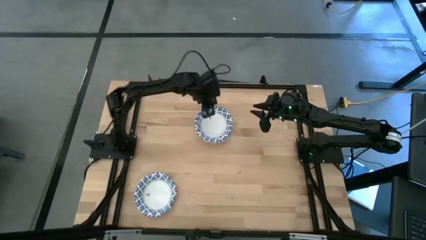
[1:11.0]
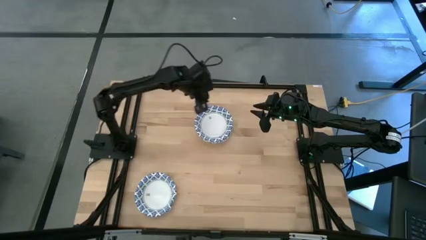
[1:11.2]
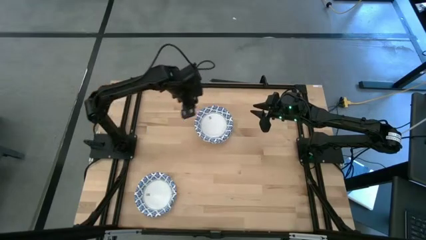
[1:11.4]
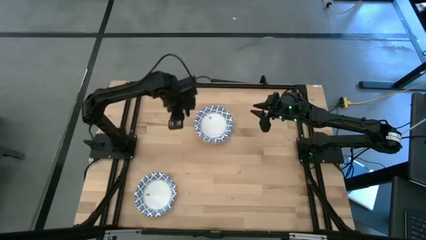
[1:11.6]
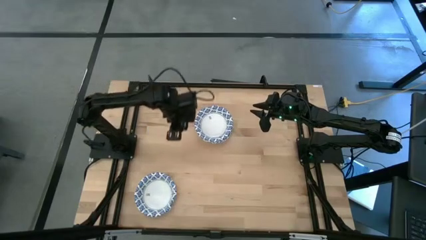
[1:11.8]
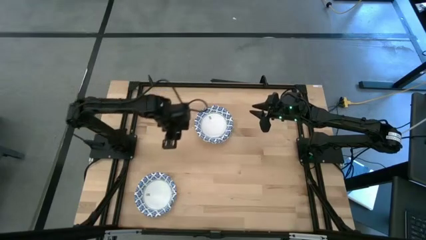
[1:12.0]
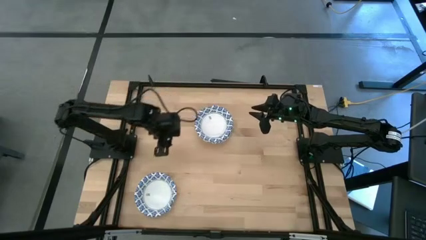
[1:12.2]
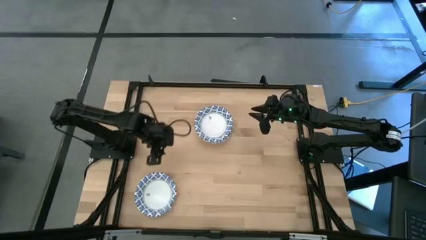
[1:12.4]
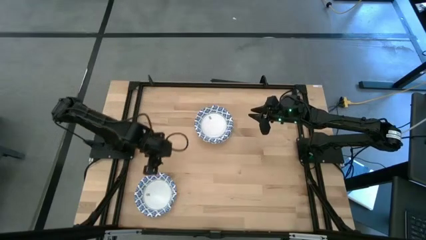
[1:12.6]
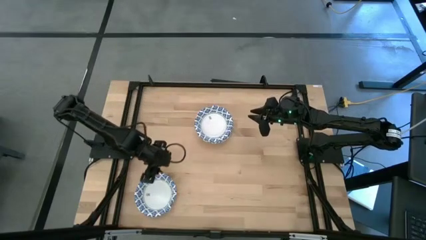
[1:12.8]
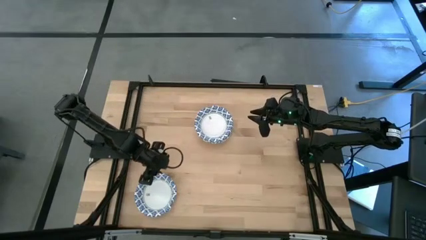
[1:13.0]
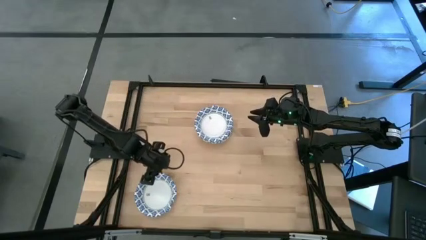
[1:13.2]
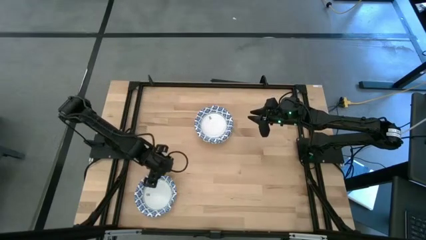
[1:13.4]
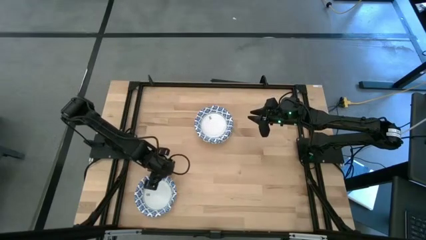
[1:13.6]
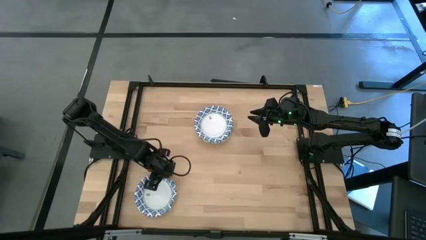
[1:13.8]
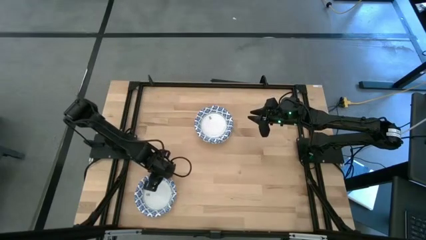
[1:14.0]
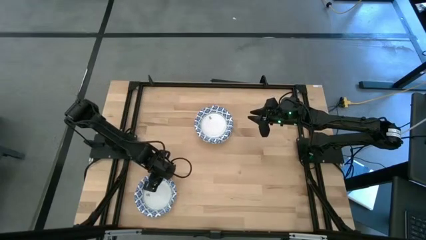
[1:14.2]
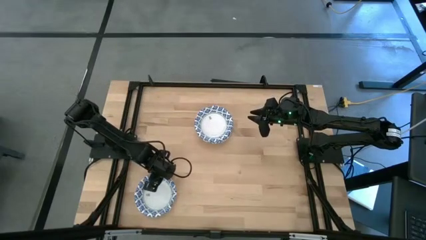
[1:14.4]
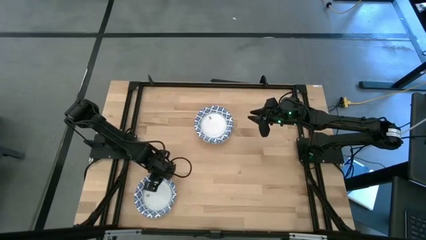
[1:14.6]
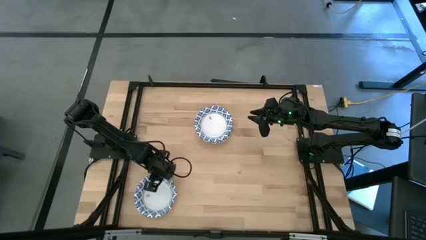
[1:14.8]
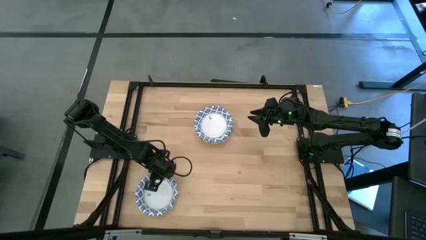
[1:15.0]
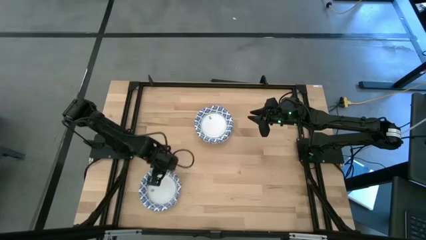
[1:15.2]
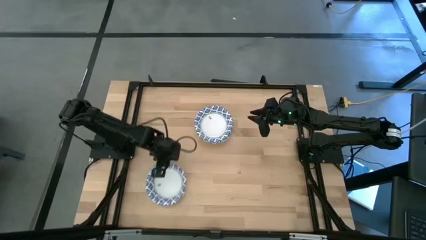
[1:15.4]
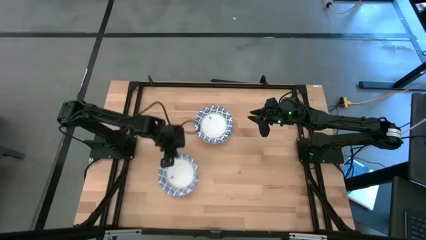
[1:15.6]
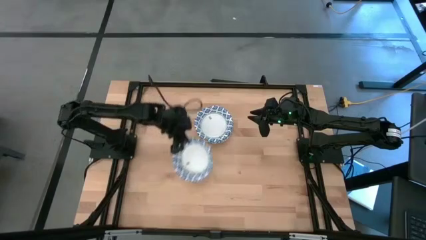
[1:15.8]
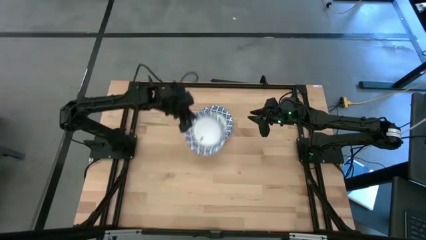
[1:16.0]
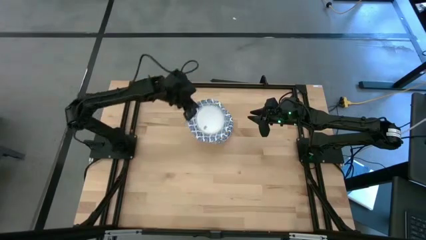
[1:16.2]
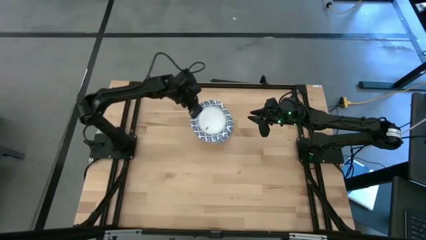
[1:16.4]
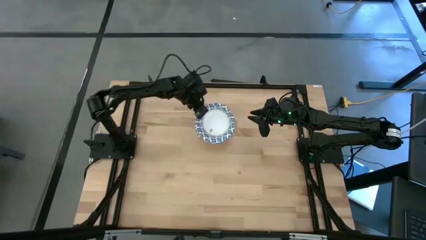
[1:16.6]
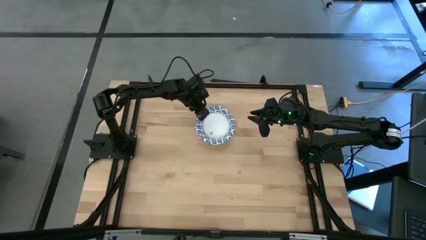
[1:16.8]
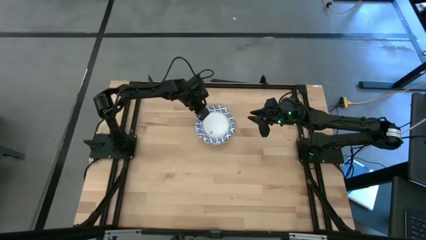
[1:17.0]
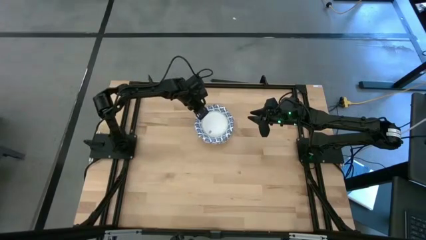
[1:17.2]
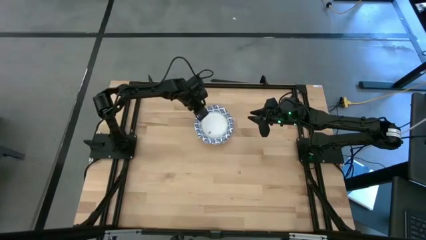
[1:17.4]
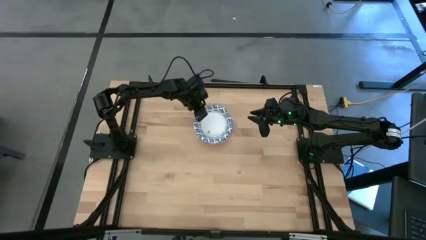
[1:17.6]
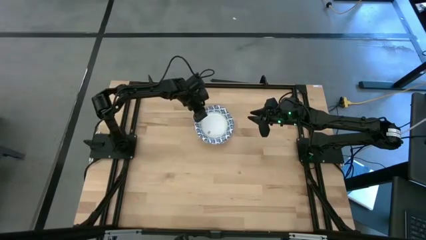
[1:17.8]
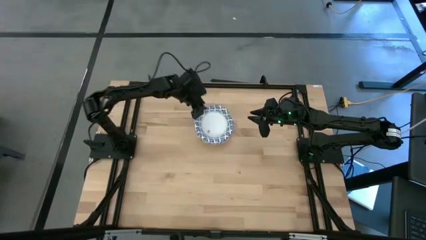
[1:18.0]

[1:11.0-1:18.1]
Task: Nest bowls inside each other
Stack the bowl on top of the bowl on the table

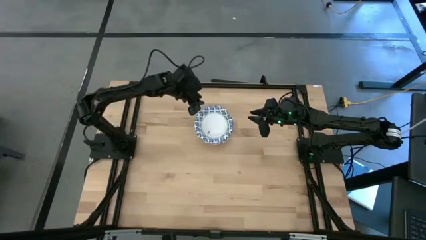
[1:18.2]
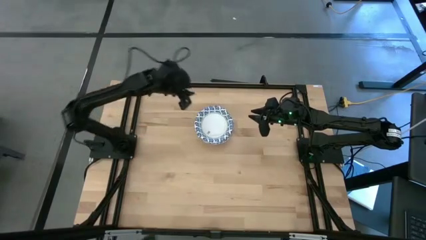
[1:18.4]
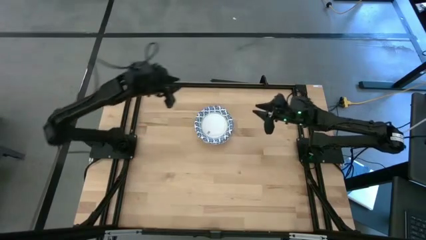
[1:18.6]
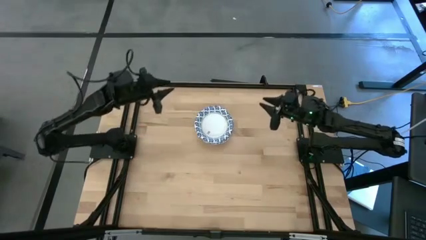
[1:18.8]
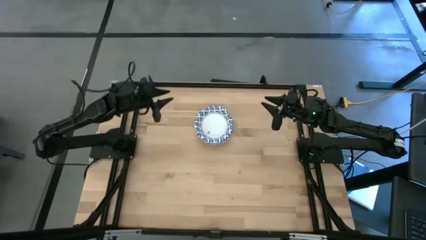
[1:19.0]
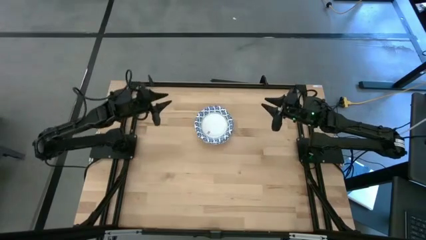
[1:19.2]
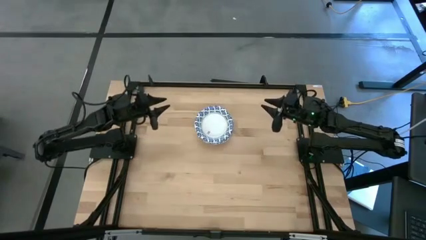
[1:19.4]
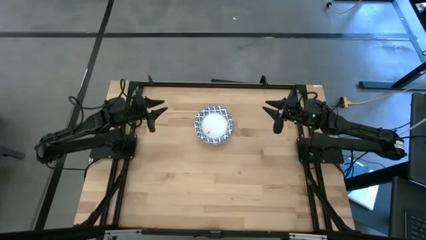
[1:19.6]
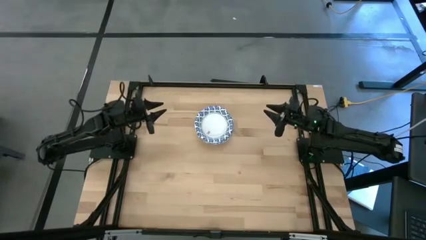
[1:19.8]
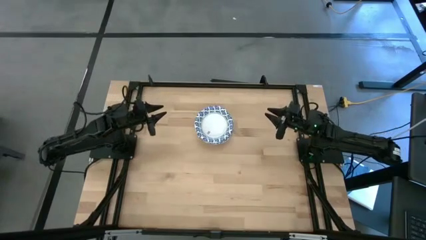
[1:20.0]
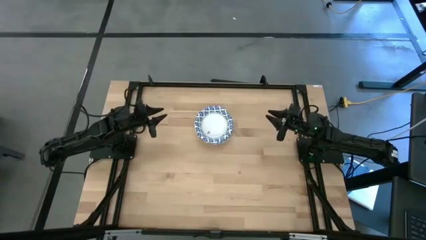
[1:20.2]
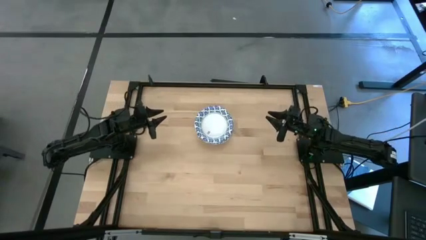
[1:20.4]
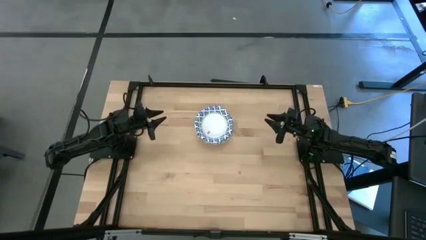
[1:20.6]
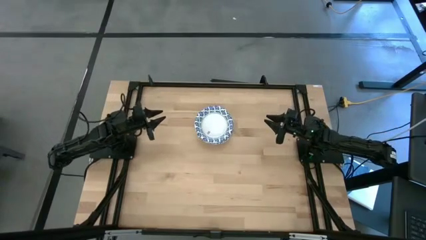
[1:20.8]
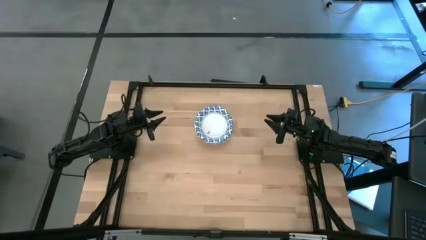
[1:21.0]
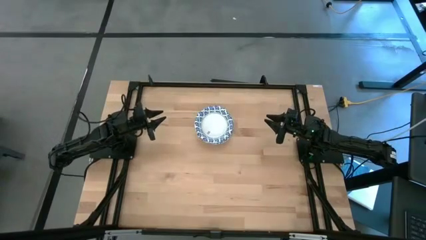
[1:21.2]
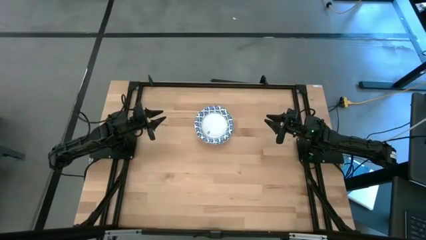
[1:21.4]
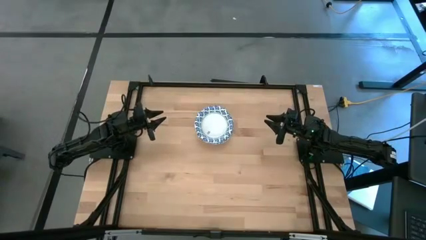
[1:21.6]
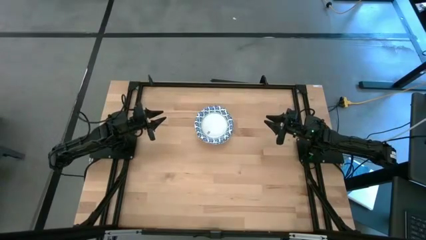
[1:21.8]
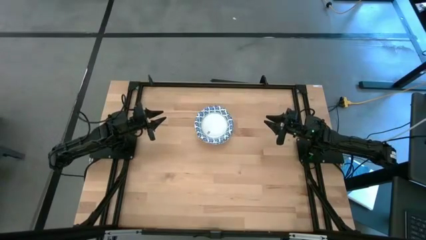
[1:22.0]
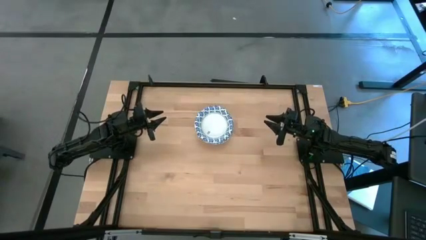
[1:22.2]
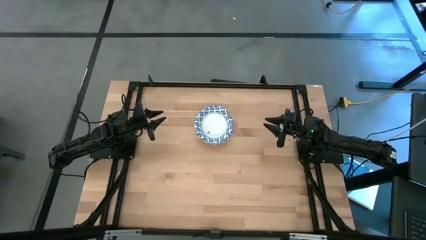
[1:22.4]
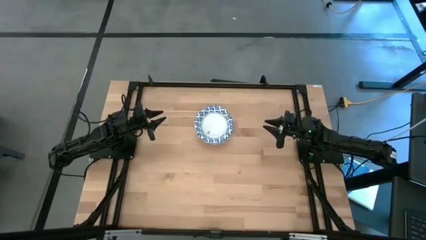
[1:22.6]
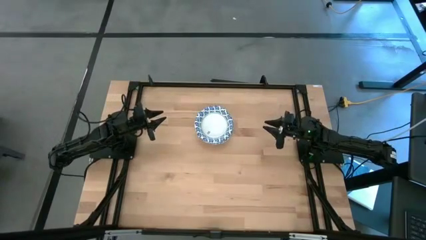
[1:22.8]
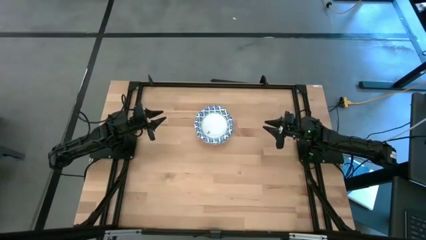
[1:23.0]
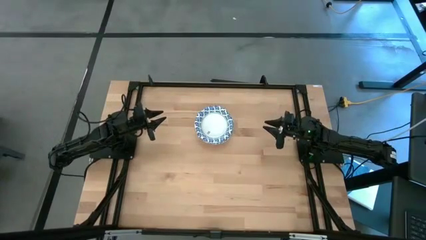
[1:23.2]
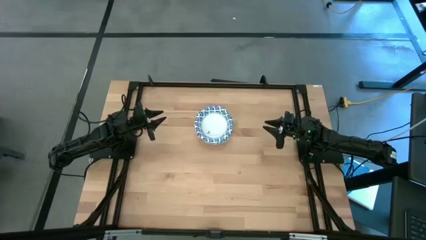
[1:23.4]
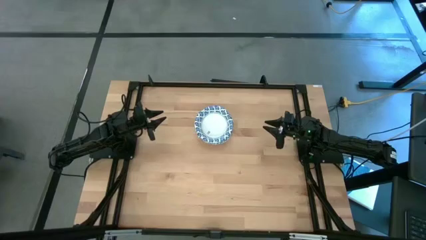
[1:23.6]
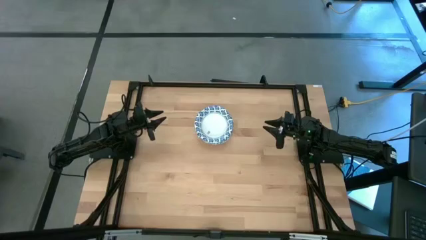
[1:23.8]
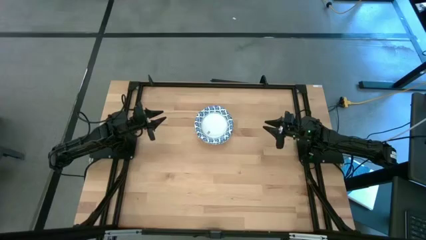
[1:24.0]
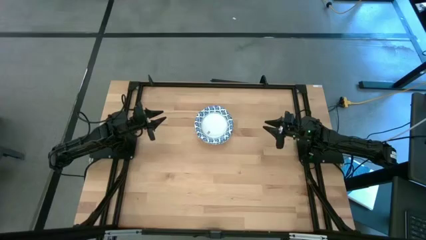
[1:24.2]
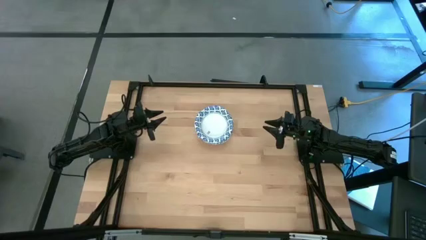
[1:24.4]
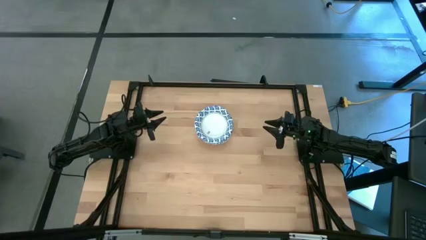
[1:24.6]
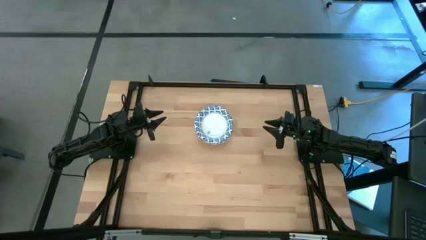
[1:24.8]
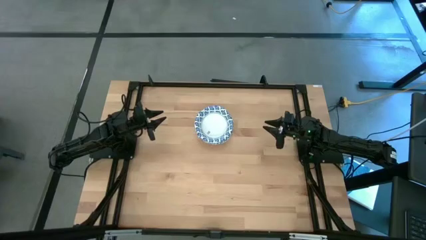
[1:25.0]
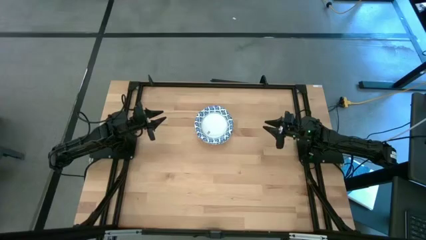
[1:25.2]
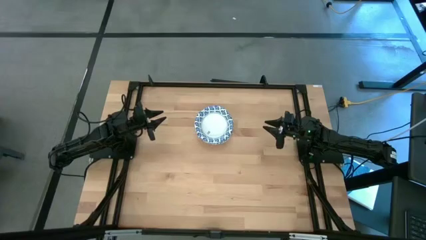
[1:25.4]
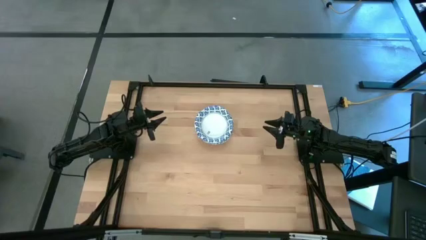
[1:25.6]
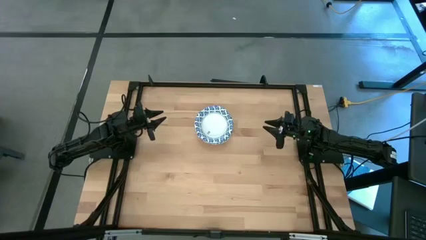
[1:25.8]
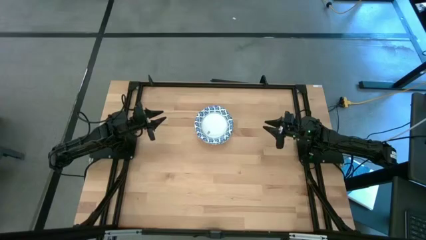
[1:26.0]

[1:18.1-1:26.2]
Return to Home Position

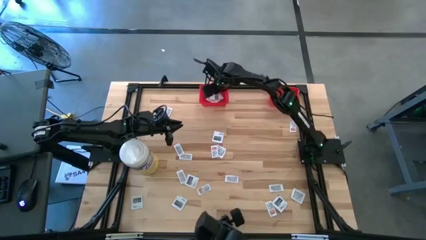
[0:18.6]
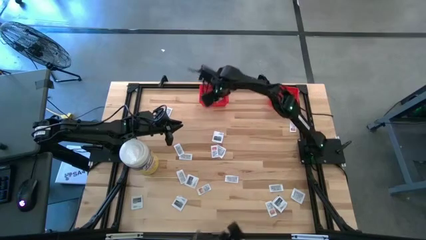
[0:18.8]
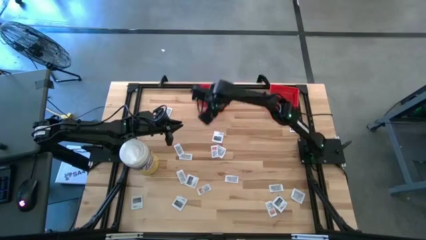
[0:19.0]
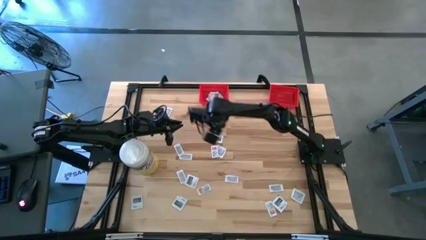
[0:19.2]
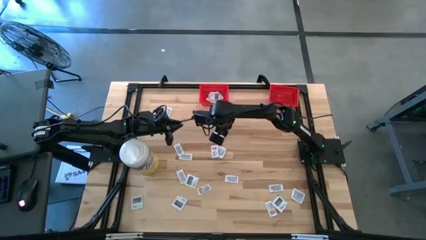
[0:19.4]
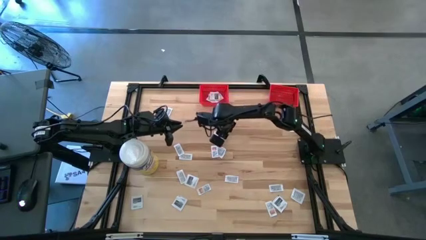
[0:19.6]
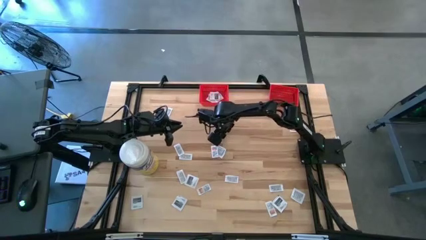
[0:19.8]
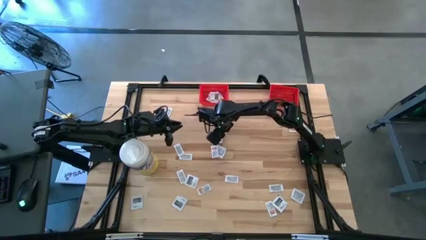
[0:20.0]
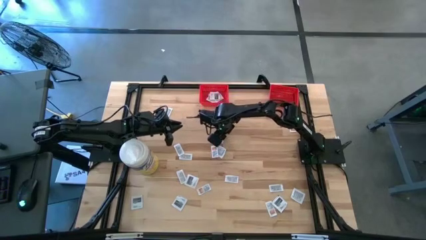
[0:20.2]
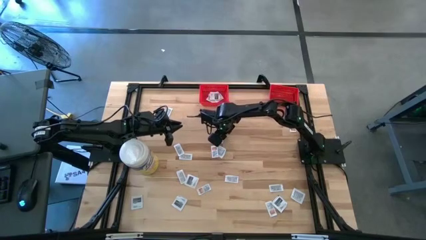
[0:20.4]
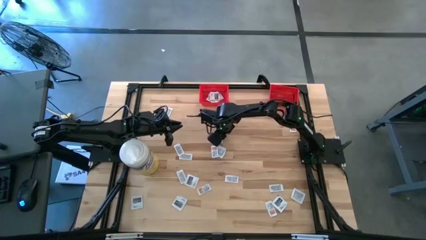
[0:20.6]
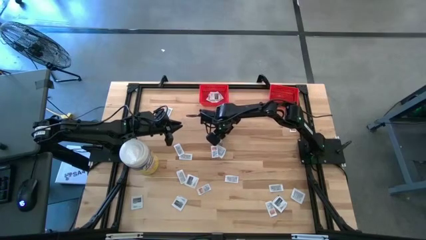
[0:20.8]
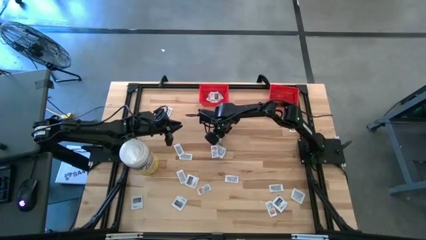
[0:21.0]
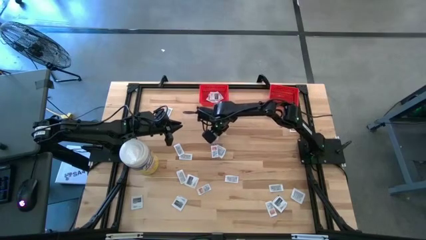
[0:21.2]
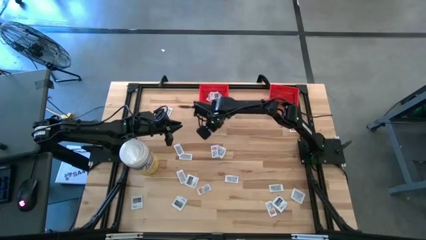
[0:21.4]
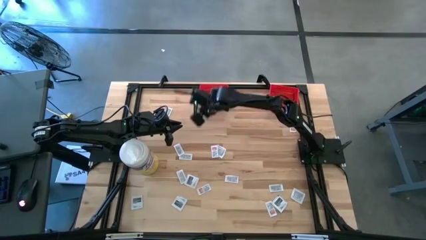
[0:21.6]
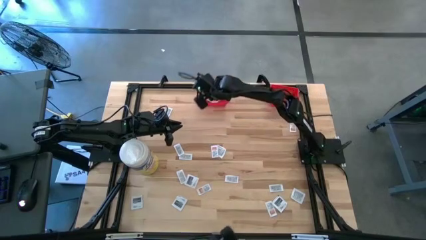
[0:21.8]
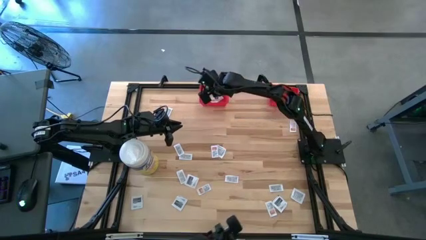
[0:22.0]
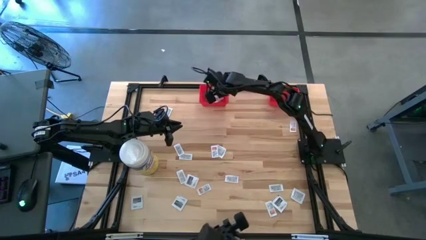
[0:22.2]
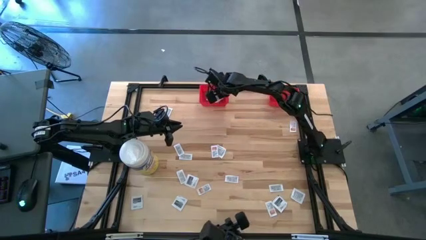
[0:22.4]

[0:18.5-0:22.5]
Task: Pick & Place First Aid Supplies
Put the towelette pack into the left red bin
